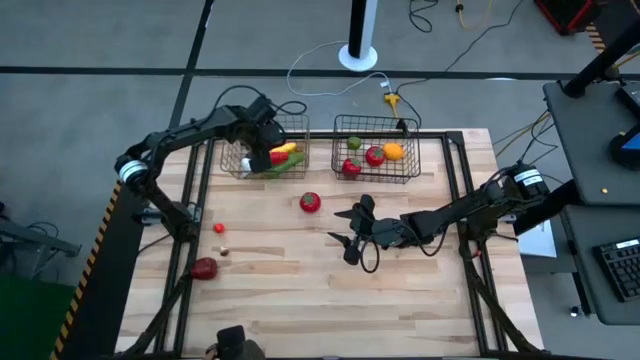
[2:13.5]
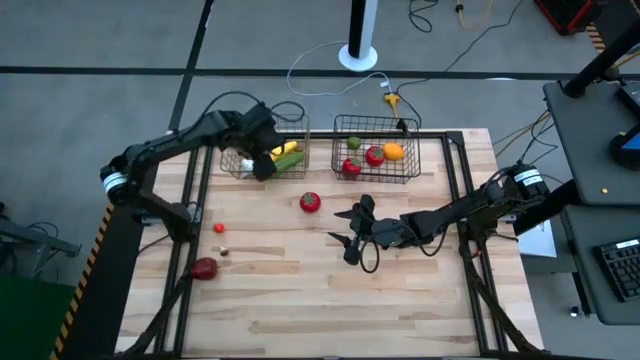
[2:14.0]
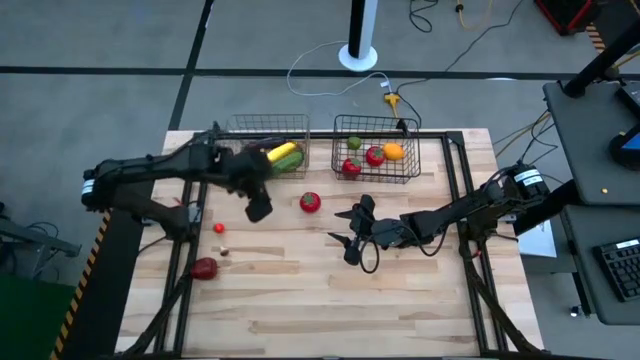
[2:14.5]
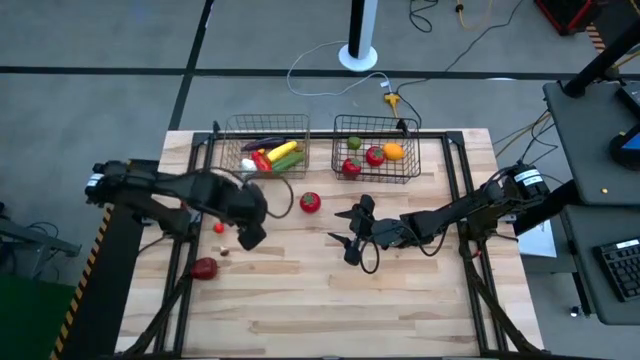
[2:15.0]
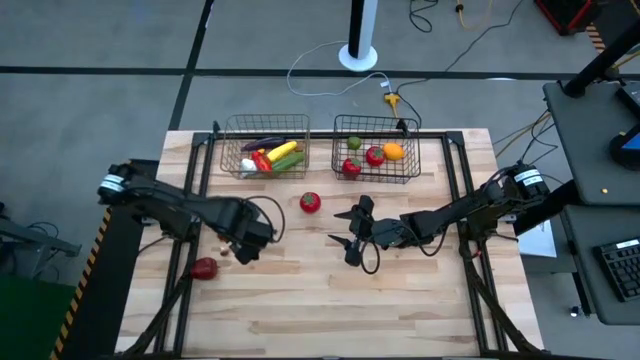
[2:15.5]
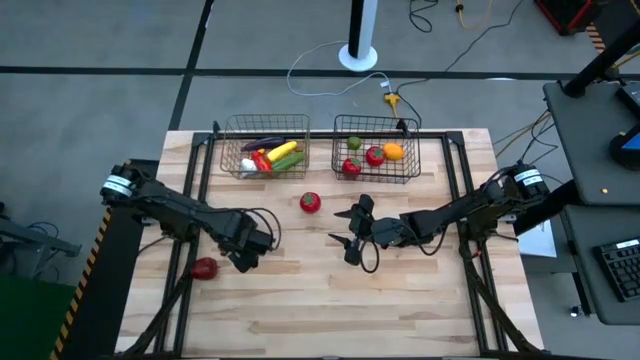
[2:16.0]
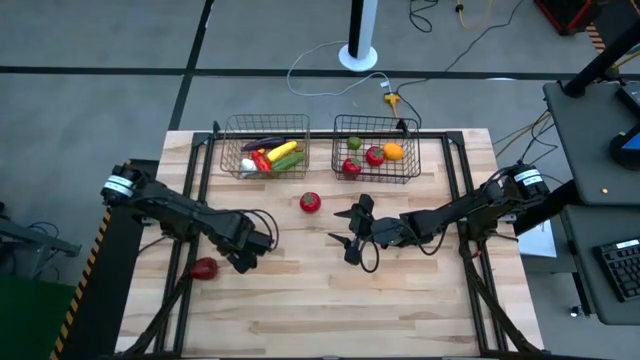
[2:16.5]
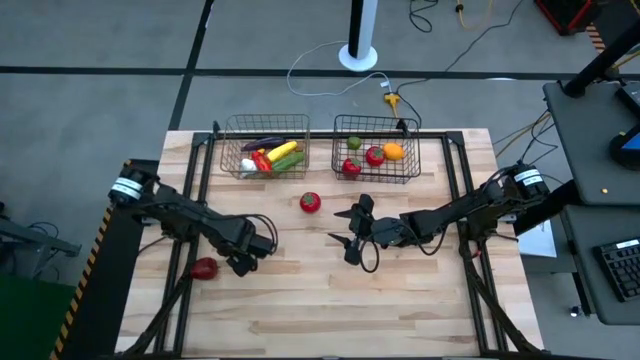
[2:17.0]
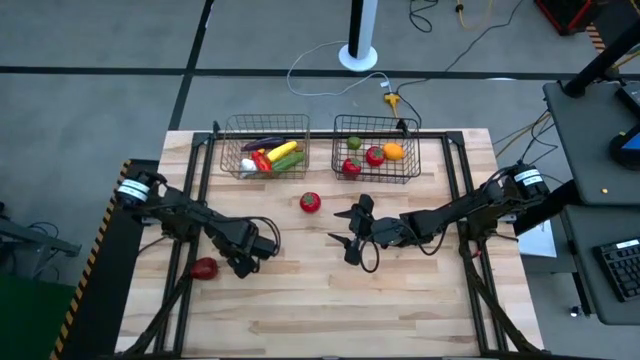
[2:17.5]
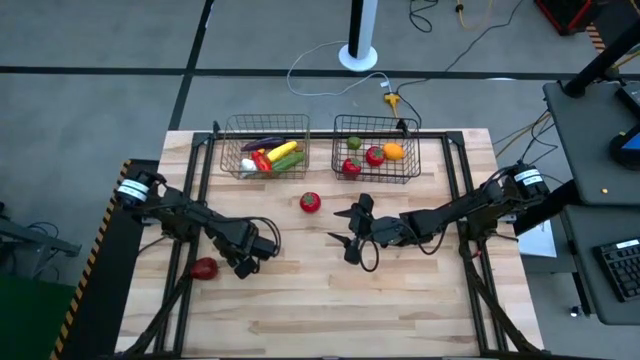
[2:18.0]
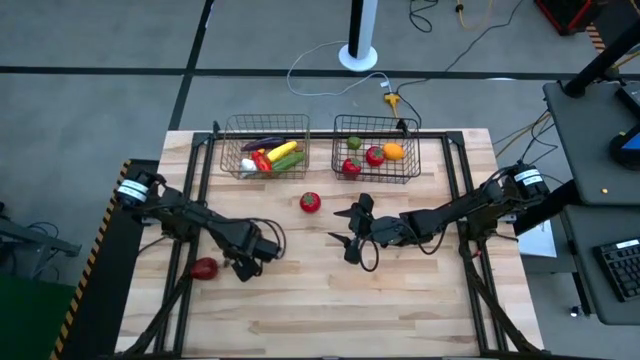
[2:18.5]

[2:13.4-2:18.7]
Task: Sort produce into baskets
Put the brown mushroom into the left wire basket

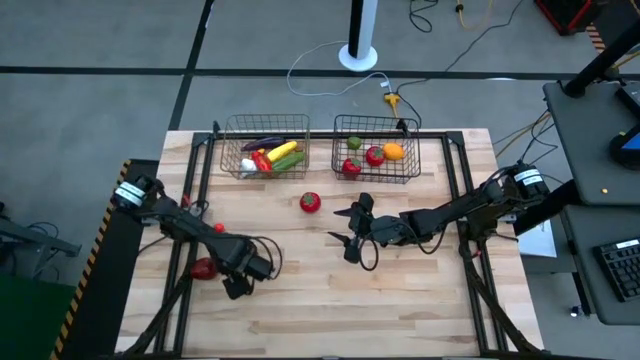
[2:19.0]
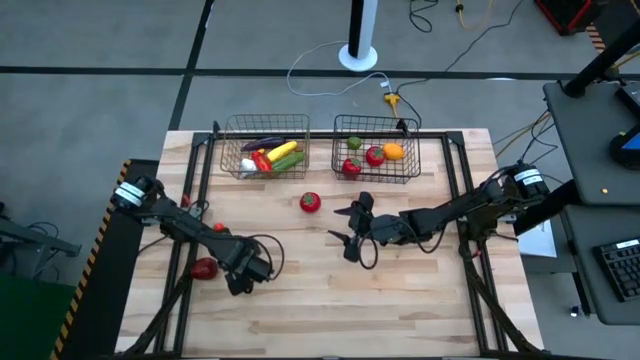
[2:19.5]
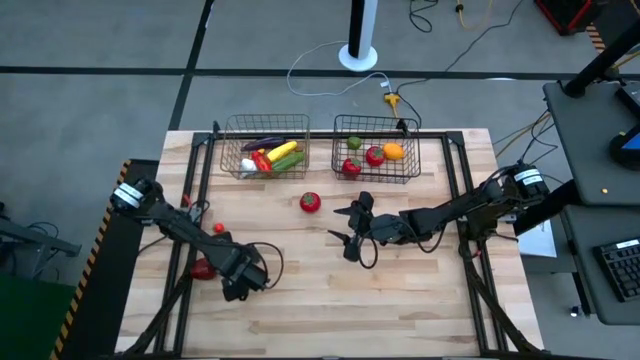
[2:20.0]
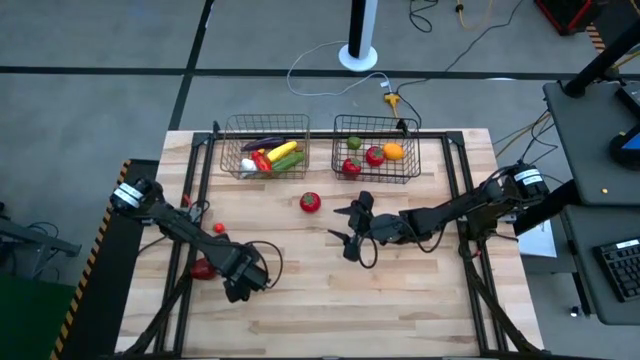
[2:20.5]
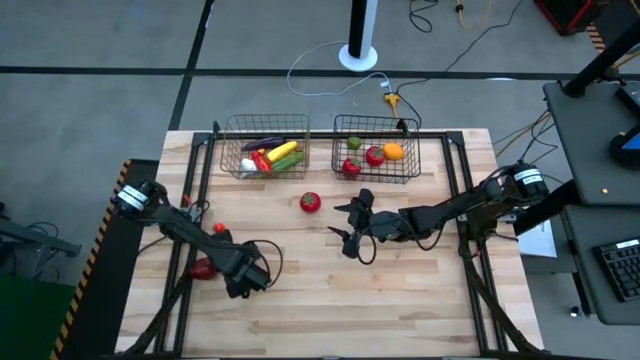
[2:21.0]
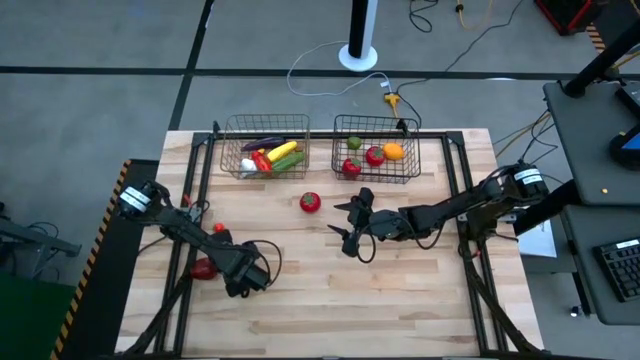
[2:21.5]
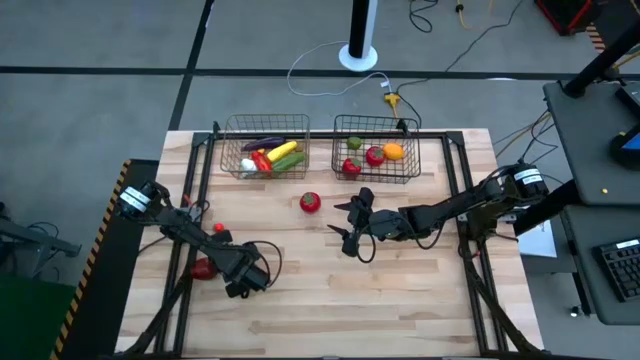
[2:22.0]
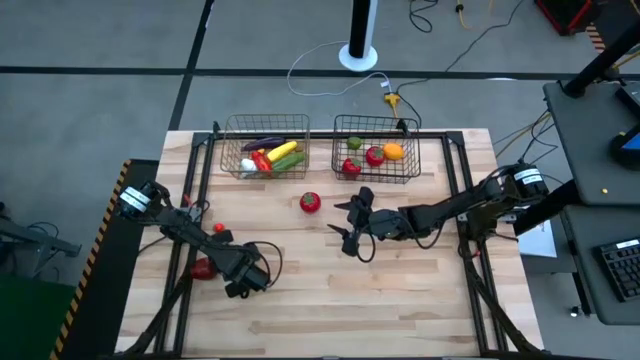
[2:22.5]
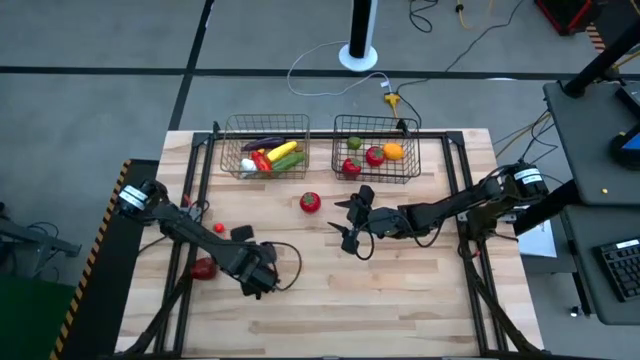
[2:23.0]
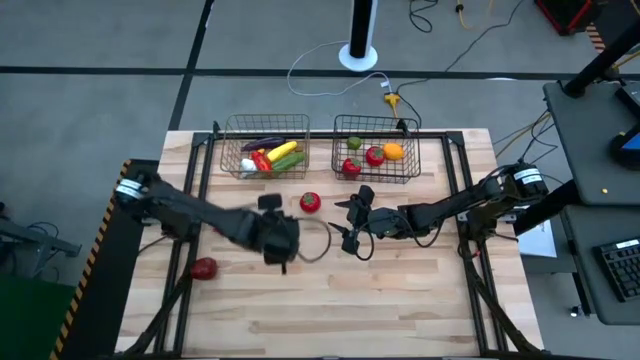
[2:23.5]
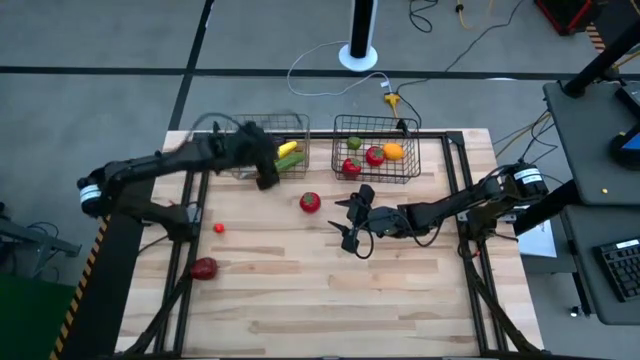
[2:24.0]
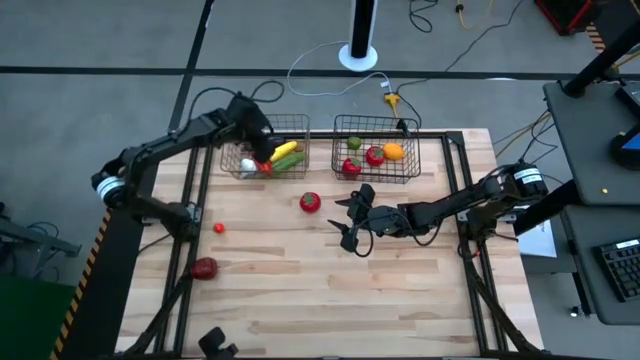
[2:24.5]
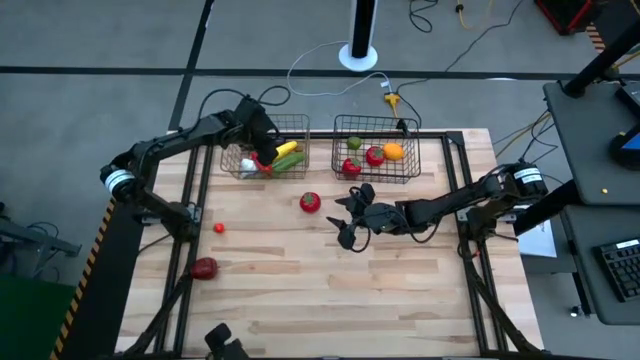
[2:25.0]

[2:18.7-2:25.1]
Put the brown mushroom into the left wire basket

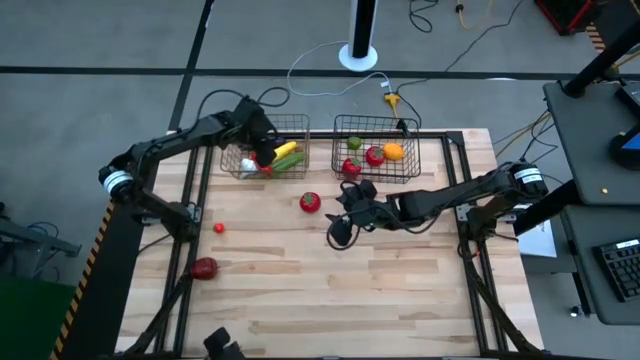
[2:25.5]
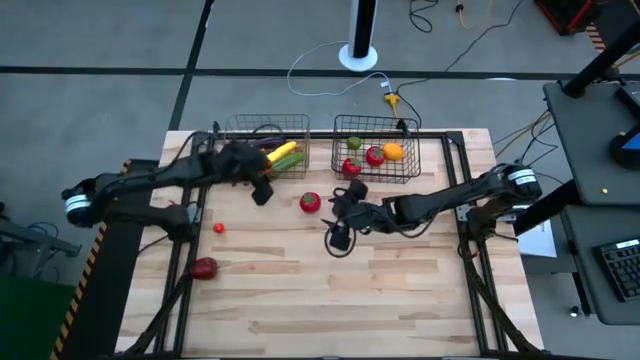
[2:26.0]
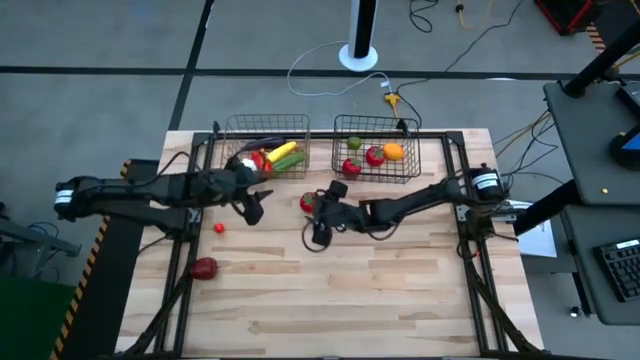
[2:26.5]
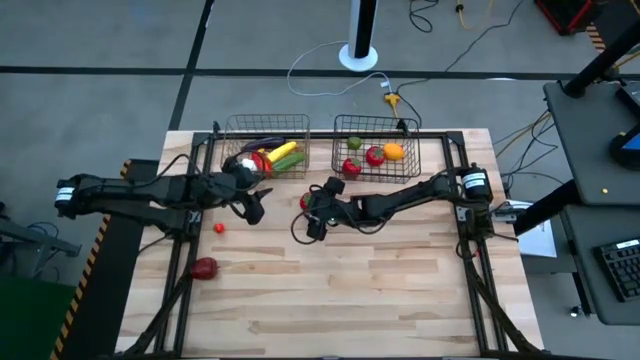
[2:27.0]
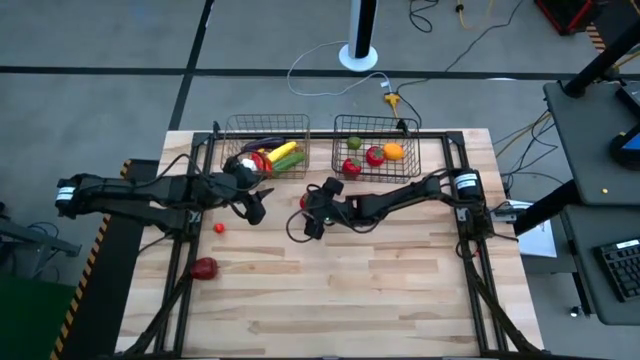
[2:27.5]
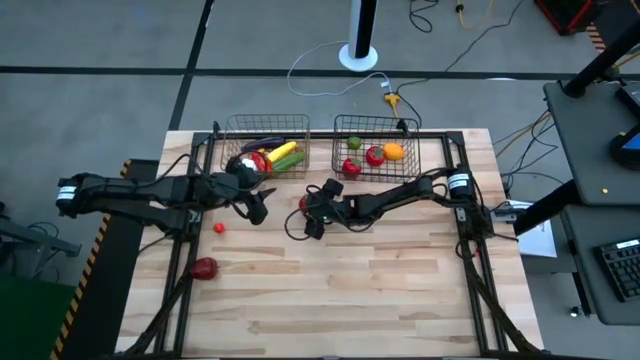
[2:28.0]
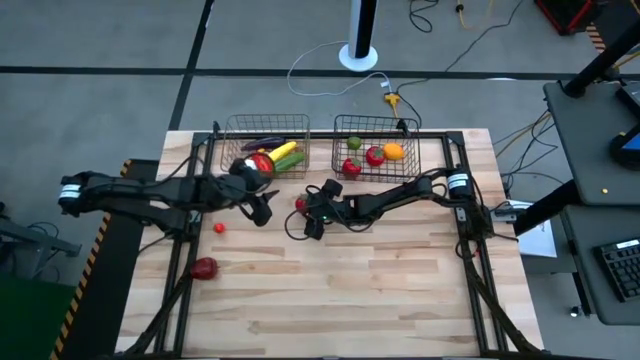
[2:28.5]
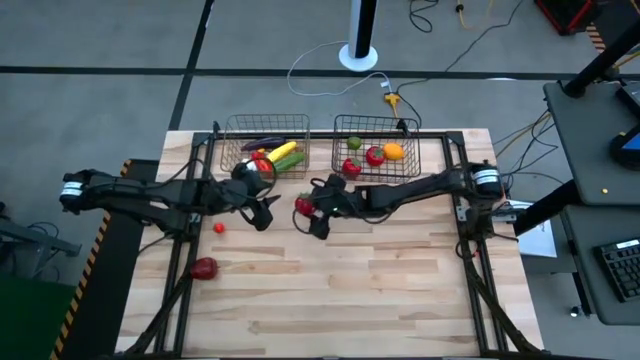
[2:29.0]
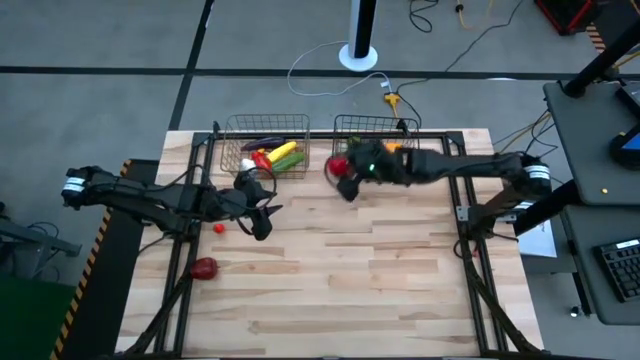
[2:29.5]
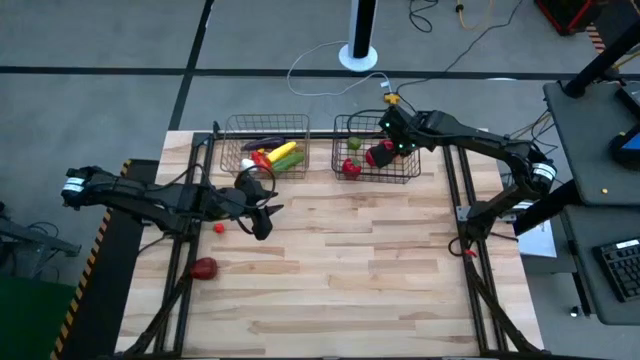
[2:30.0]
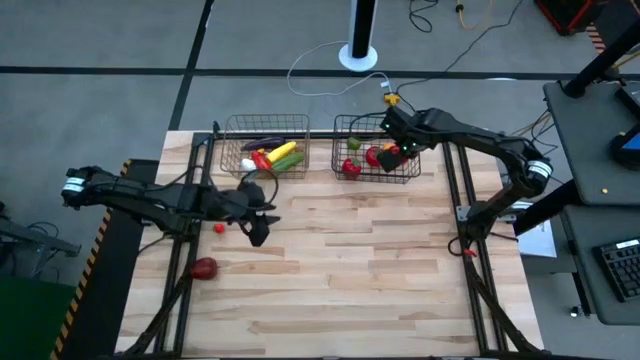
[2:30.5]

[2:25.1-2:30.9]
Put the large red tomato into the right wire basket

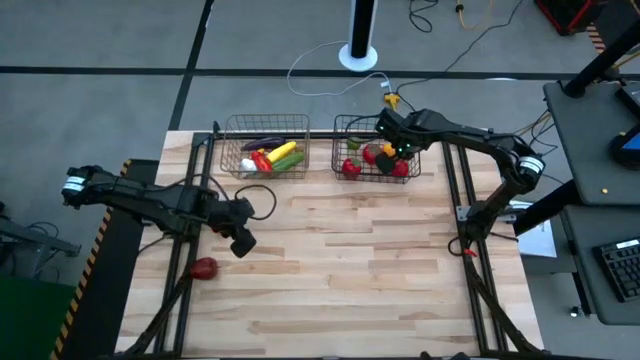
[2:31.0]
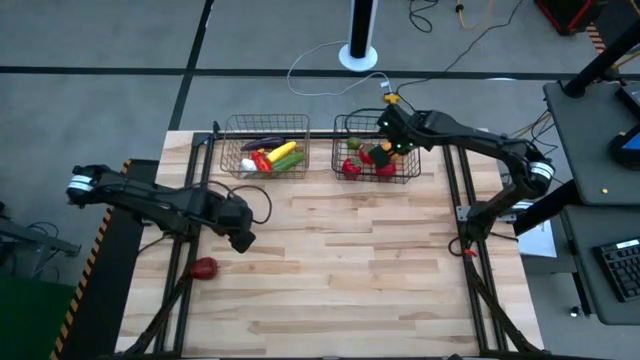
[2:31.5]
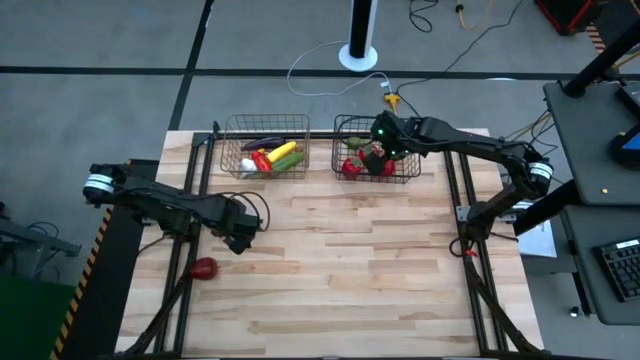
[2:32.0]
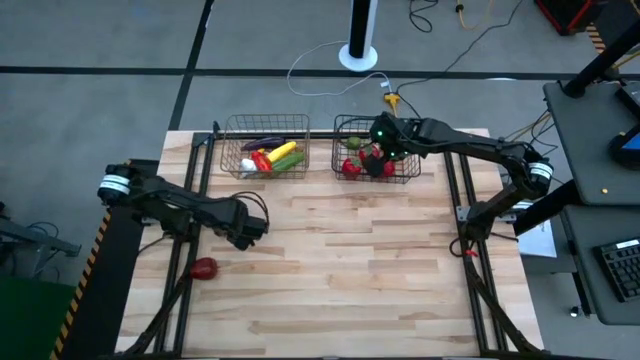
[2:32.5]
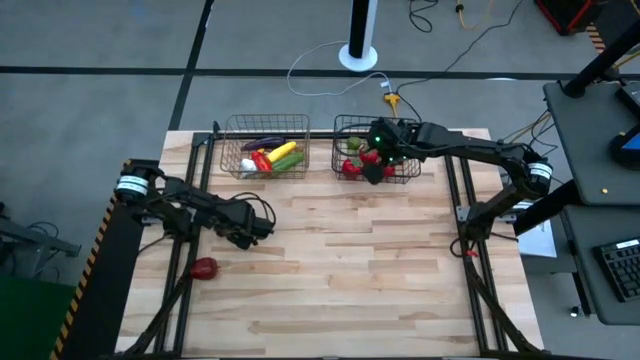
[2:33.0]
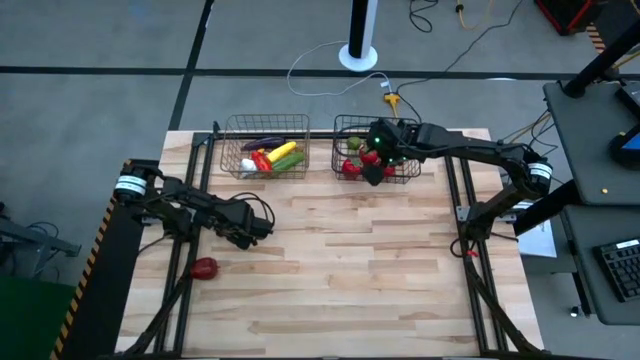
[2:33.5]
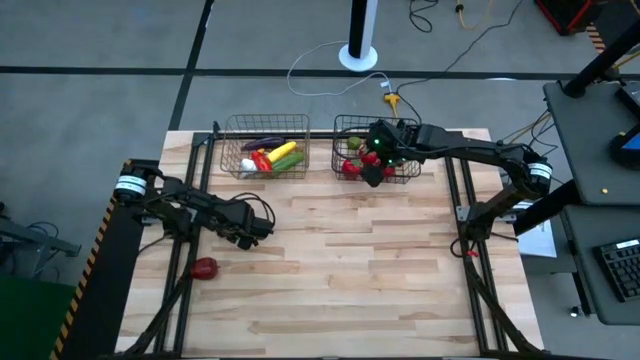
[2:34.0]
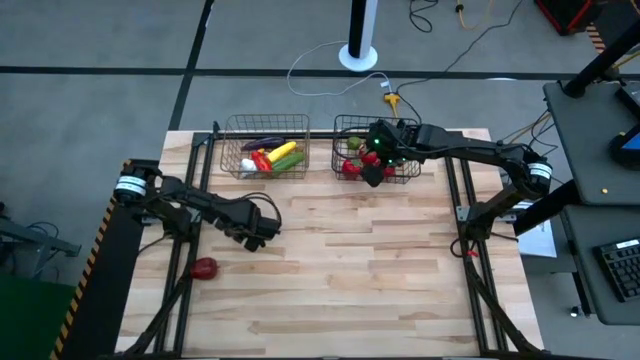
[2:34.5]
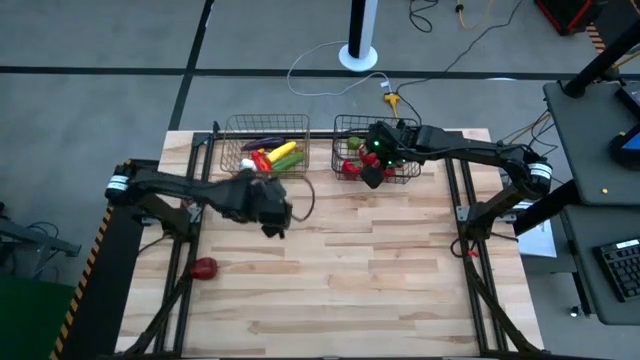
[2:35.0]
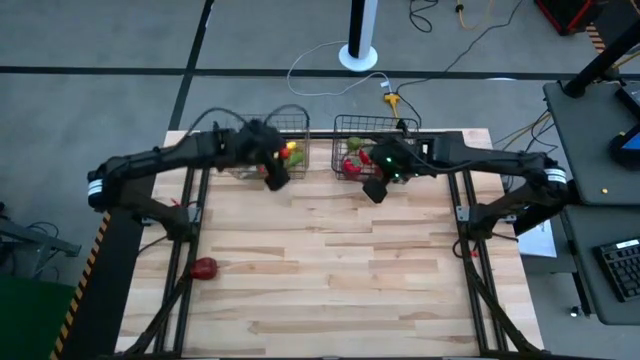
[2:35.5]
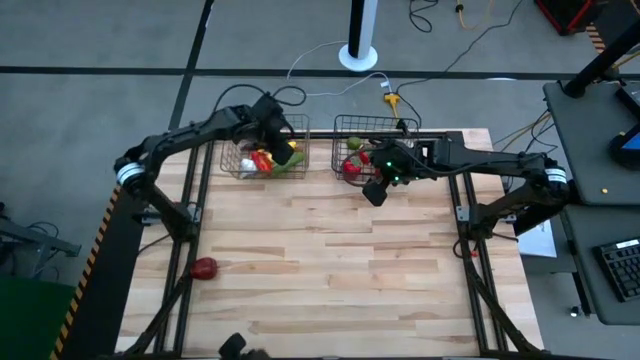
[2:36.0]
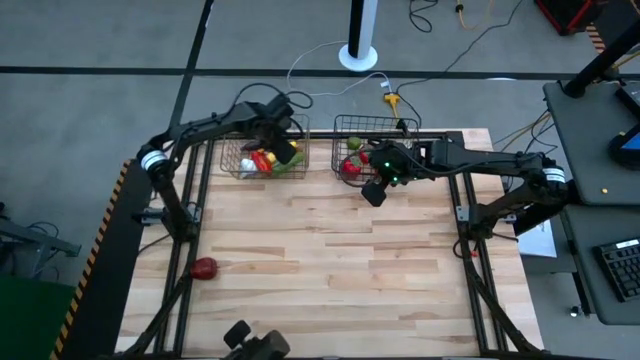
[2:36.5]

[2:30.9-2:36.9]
Put the small red tomato into the left wire basket
